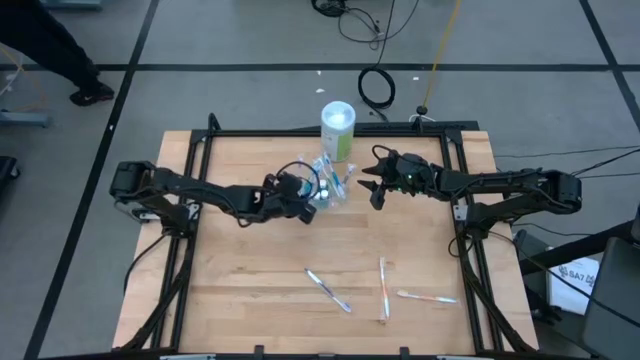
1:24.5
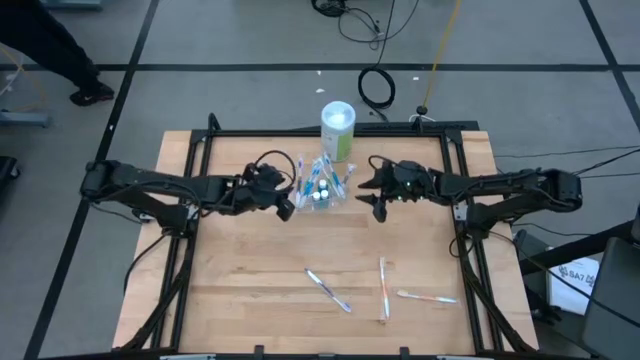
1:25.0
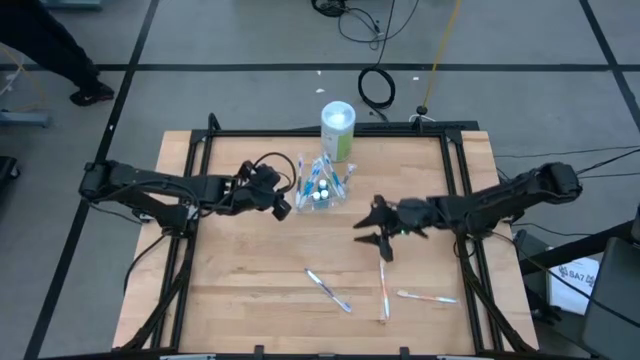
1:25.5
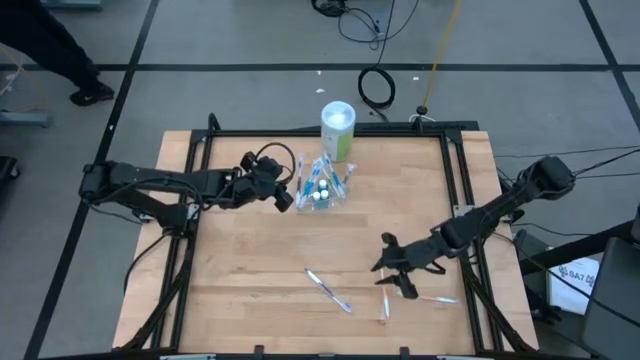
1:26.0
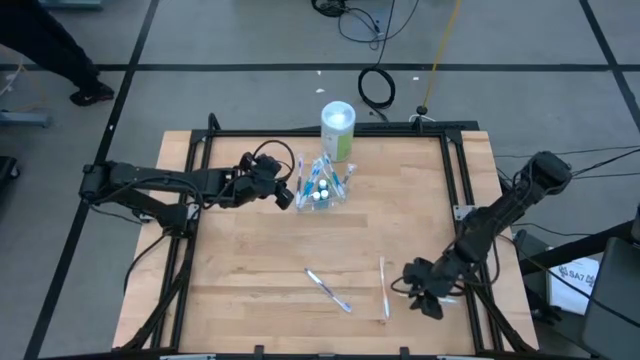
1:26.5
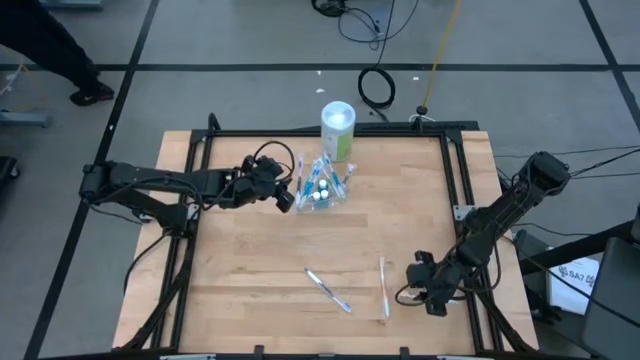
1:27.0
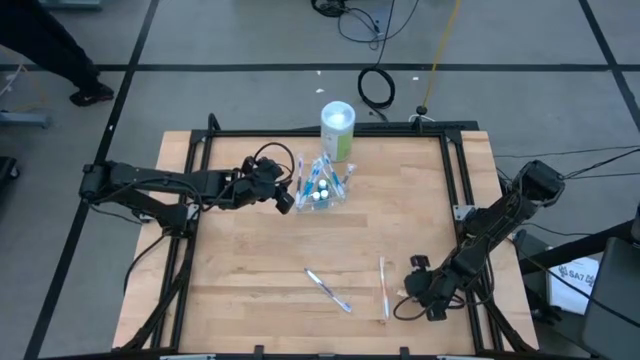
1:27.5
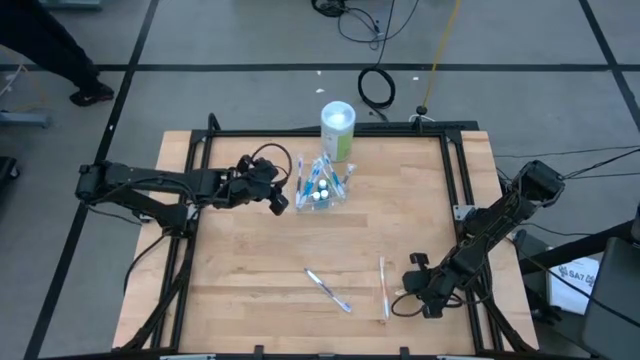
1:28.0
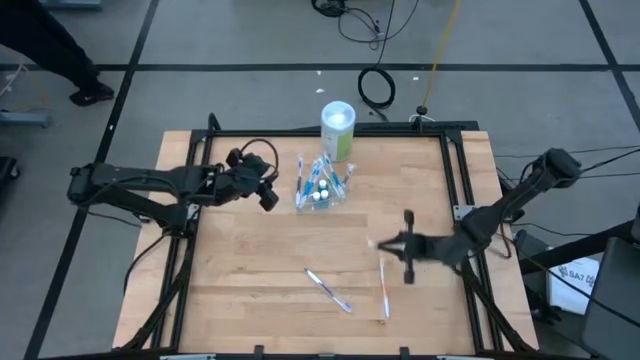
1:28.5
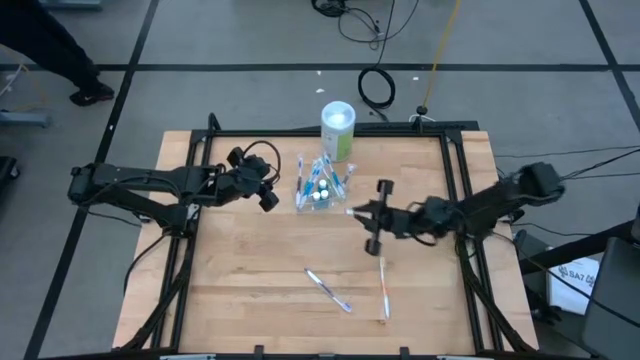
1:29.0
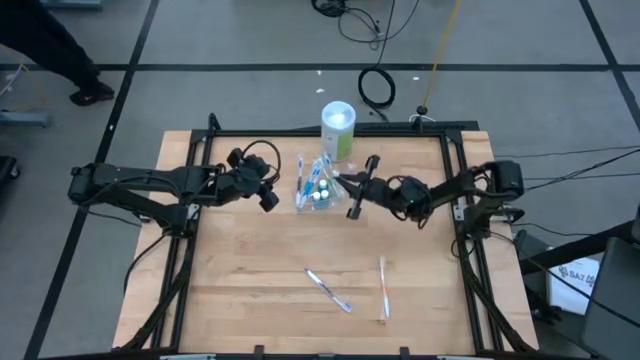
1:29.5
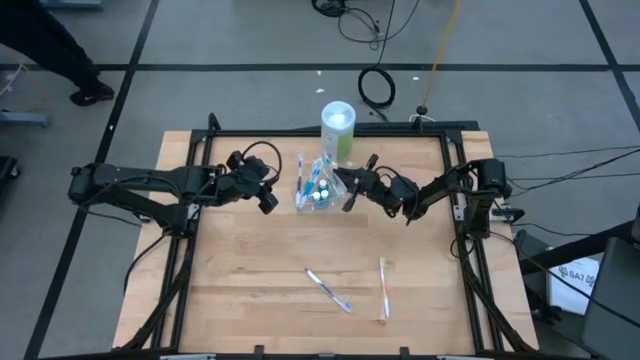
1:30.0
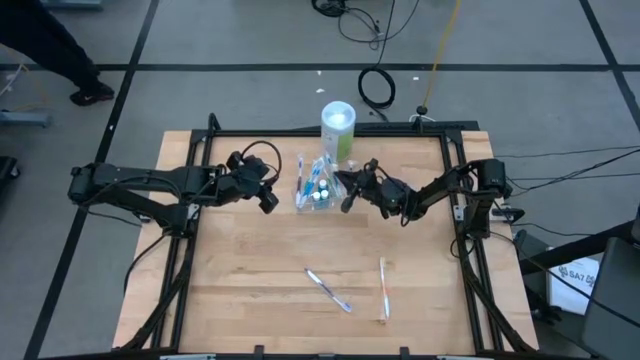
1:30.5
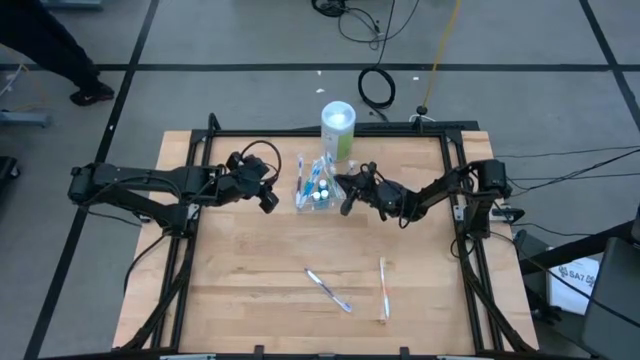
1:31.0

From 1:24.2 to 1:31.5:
Task: Pick & Place toothbrushing station
Put the right orange toothbrush into the transparent organizer

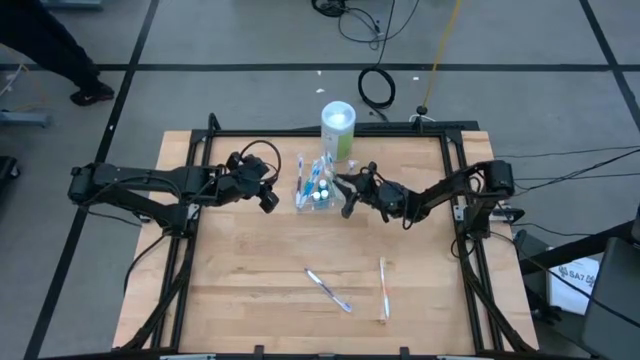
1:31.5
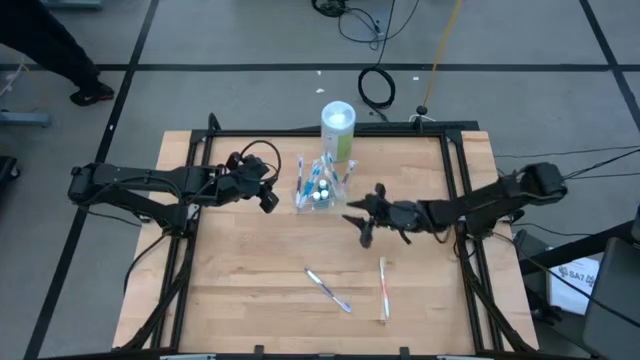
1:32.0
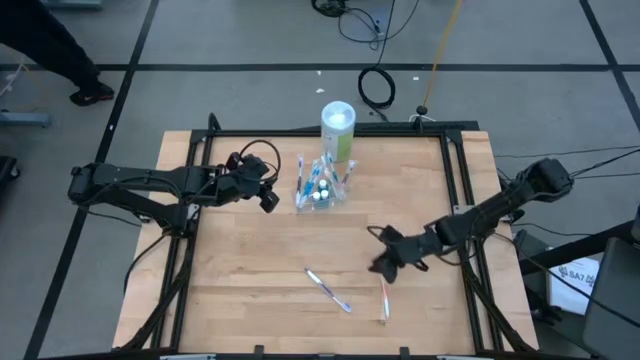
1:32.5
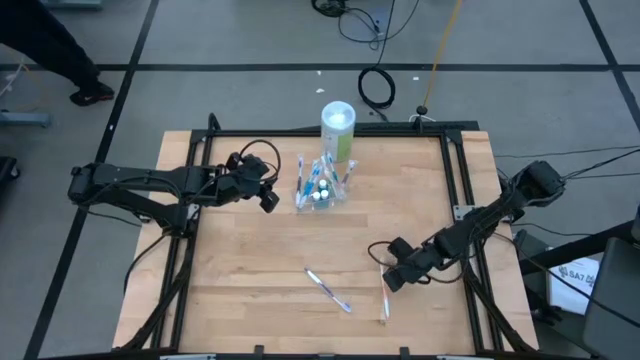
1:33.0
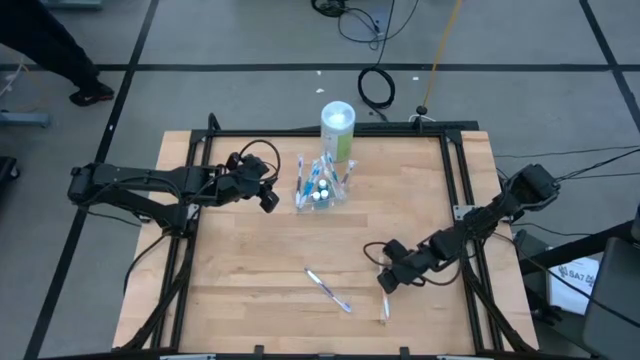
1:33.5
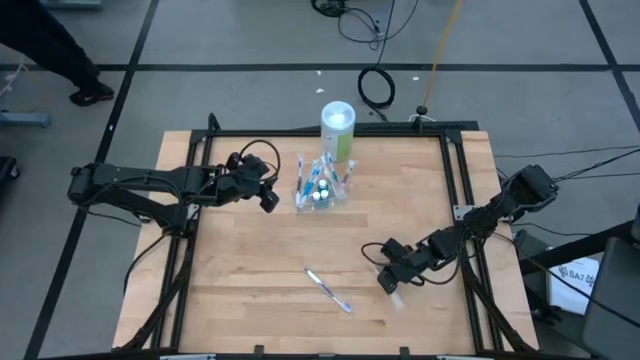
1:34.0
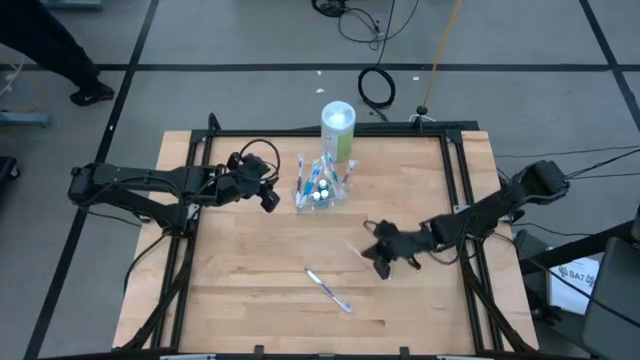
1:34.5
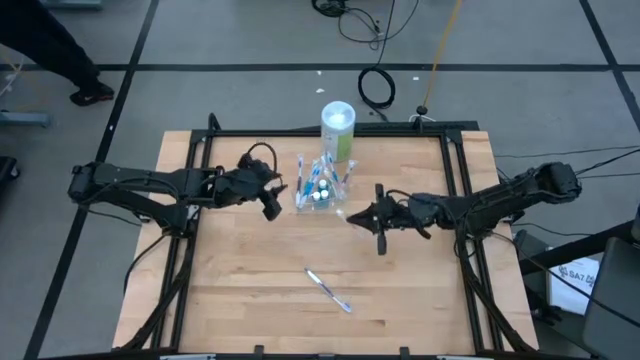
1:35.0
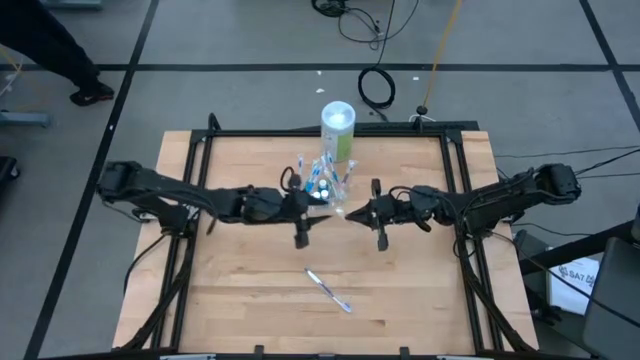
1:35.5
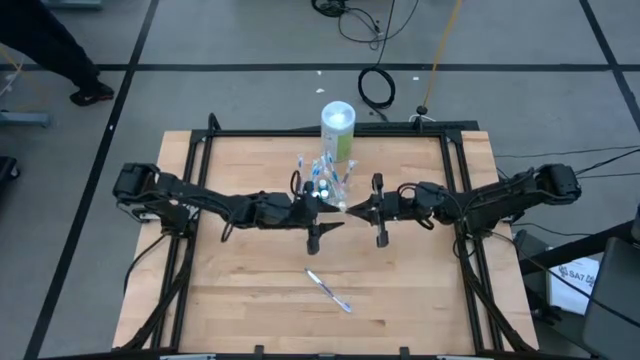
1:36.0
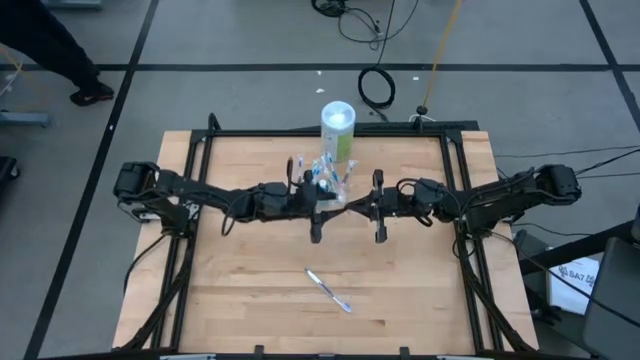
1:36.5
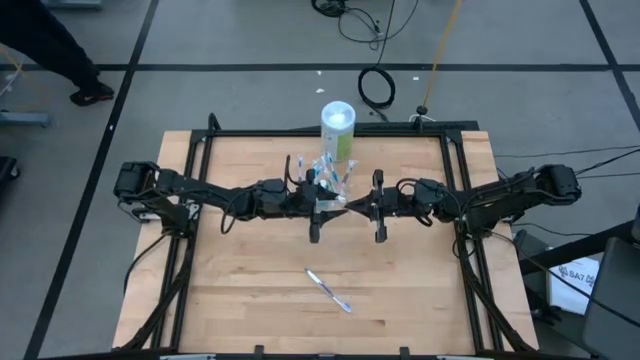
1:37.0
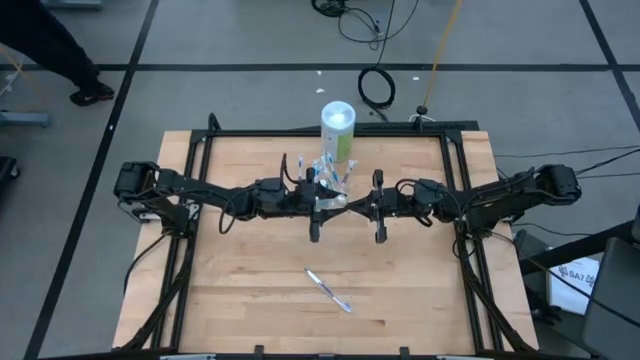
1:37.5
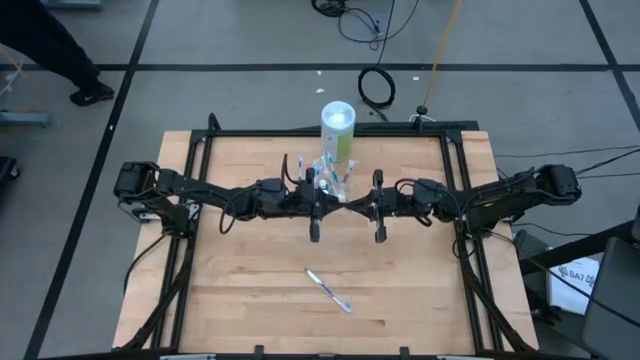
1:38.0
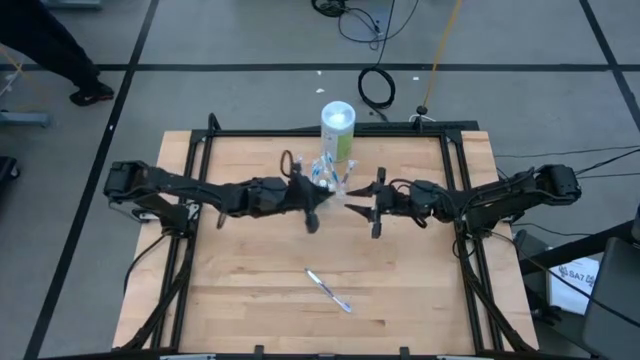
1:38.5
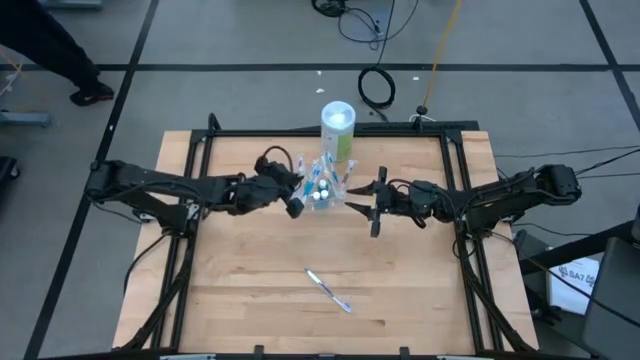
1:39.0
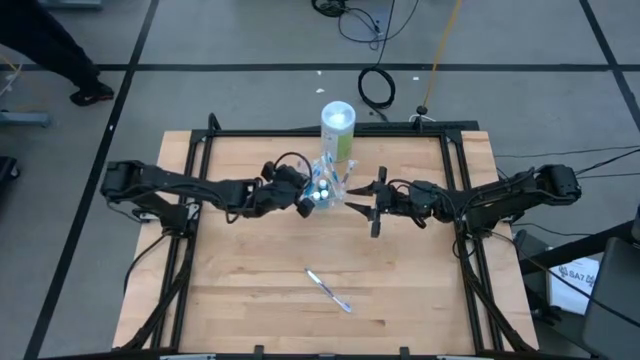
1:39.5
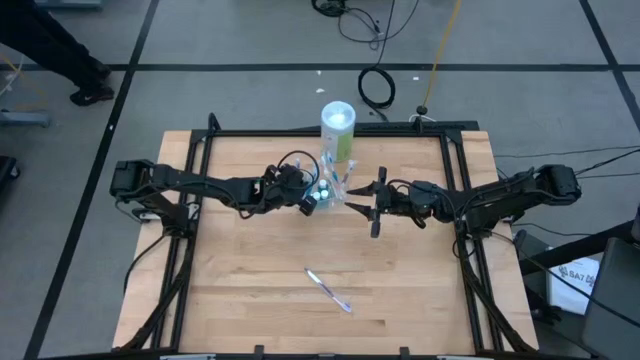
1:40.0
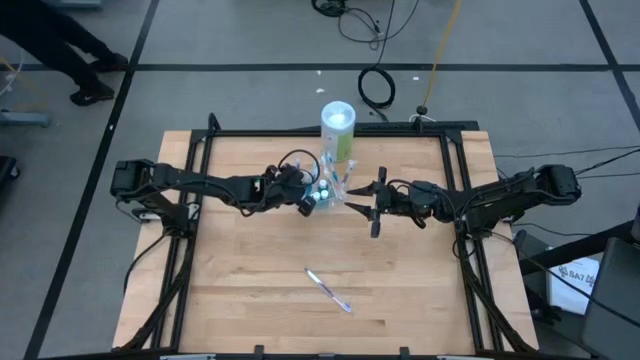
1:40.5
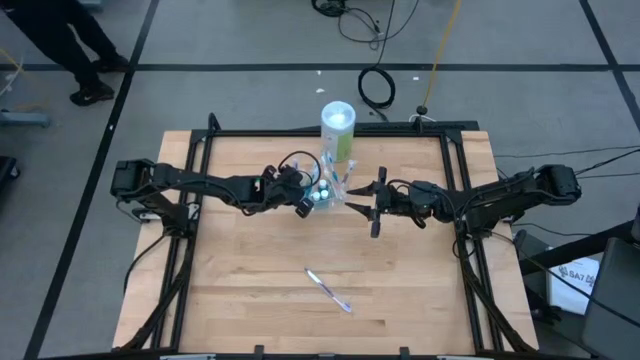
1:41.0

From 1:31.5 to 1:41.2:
Put the orange toothbrush into the transparent organizer

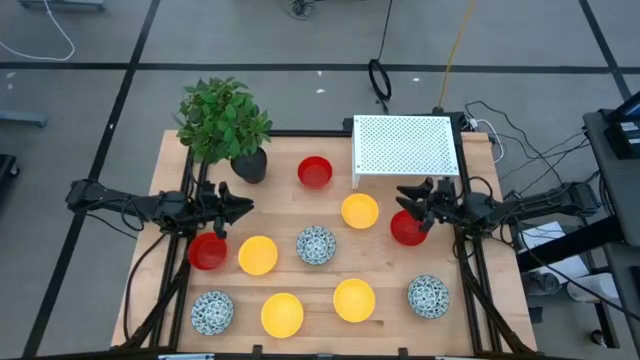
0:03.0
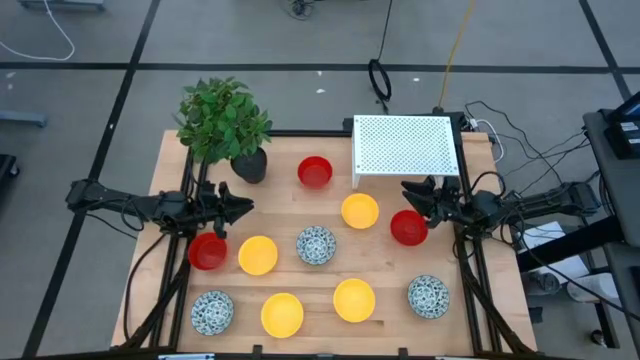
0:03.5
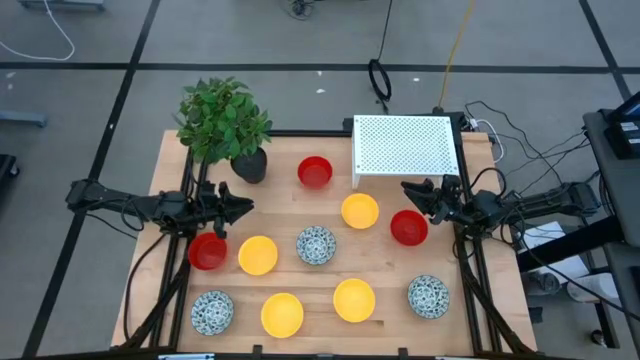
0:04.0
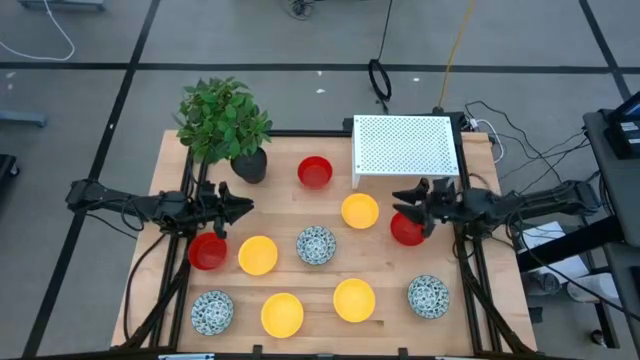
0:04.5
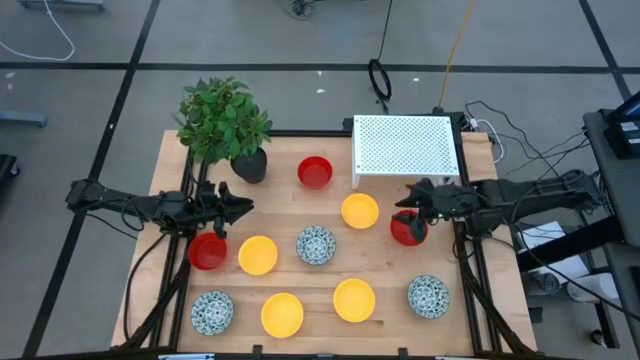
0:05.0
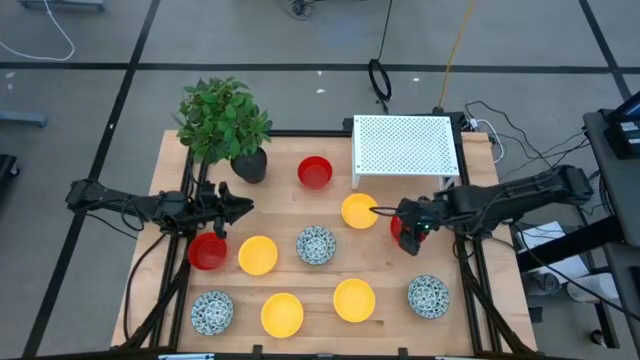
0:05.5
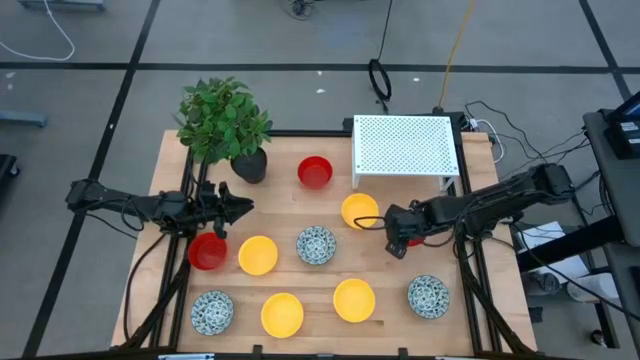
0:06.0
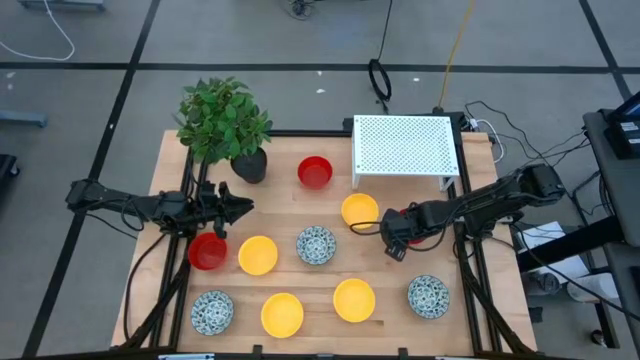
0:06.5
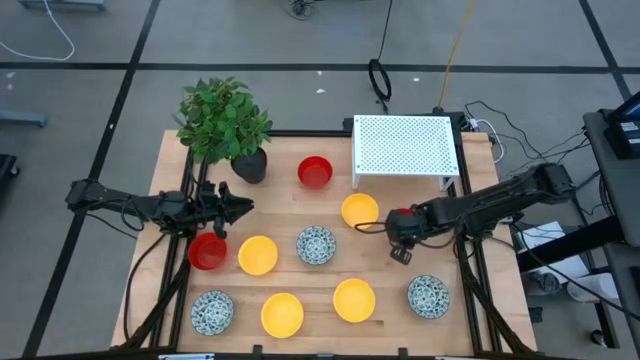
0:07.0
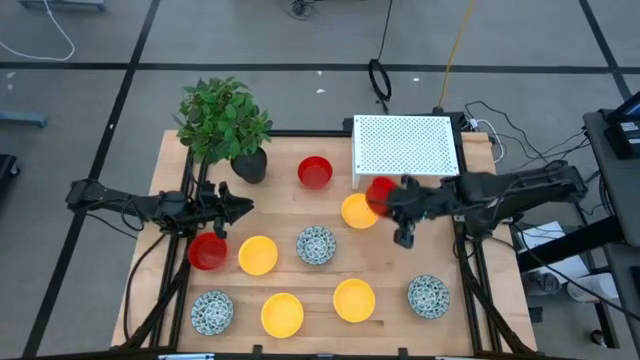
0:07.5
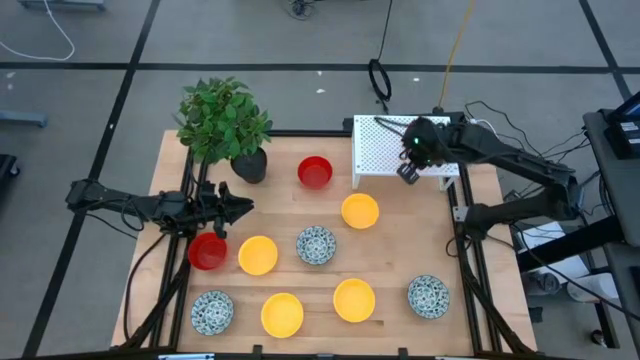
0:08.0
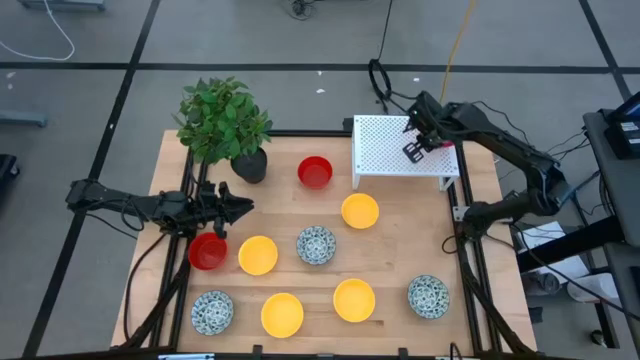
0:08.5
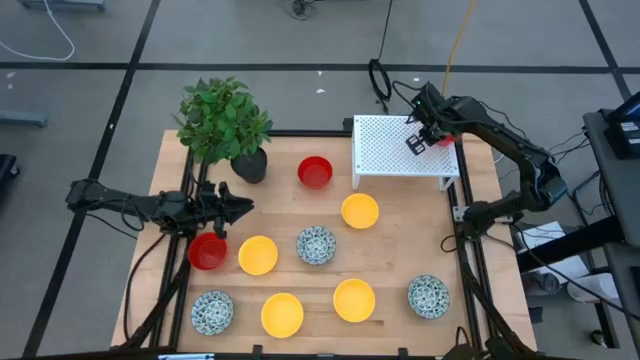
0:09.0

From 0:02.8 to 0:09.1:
Task: Pick & Place Mini bowls
Put the red bowl on the shelf
